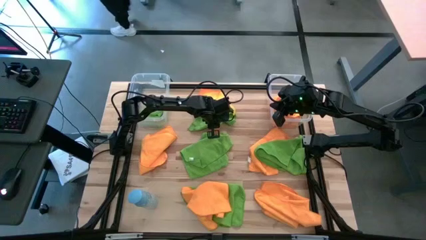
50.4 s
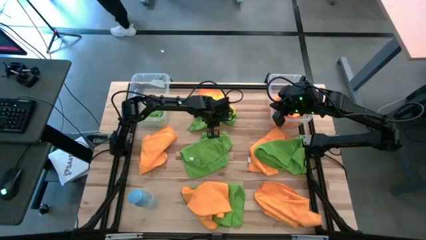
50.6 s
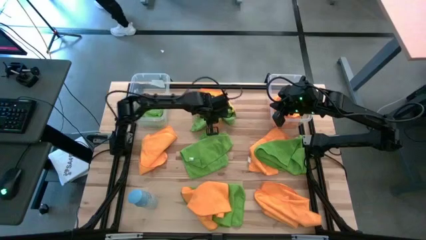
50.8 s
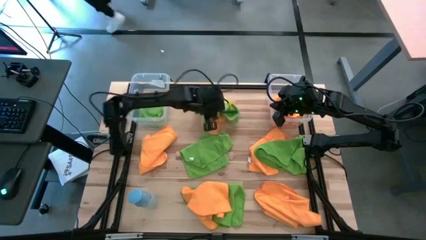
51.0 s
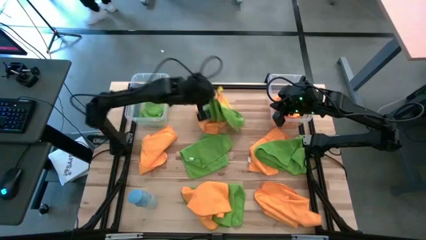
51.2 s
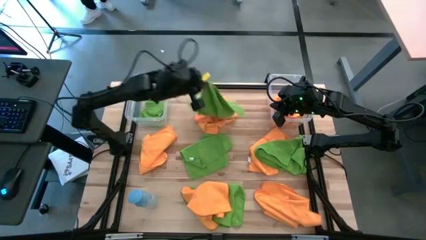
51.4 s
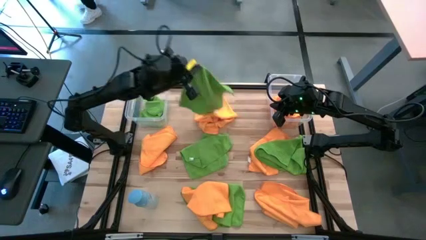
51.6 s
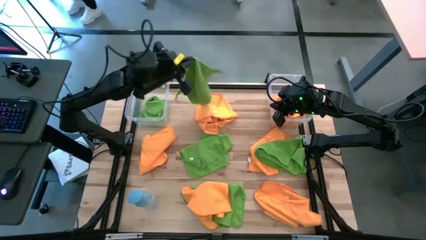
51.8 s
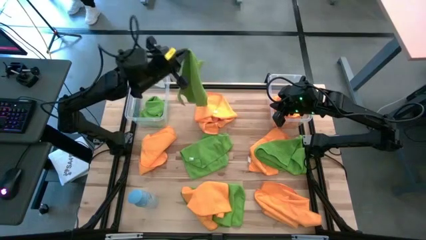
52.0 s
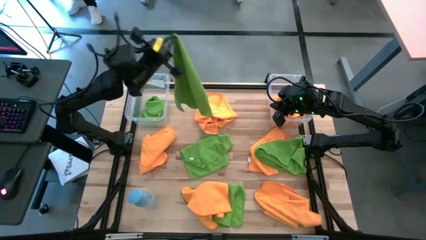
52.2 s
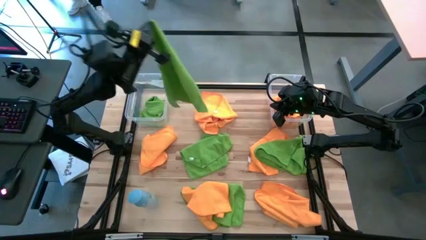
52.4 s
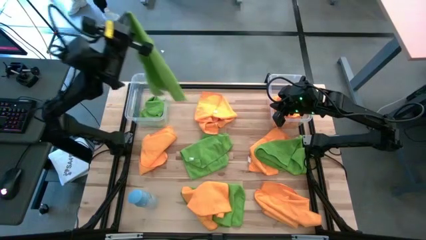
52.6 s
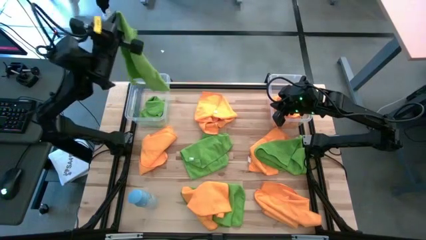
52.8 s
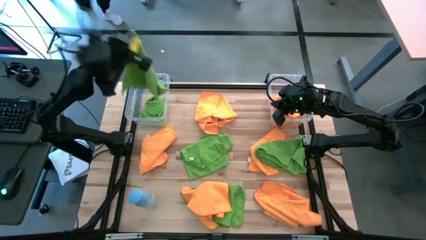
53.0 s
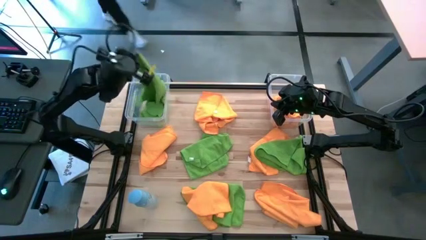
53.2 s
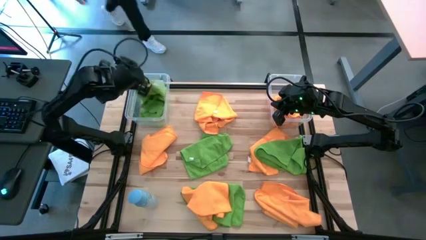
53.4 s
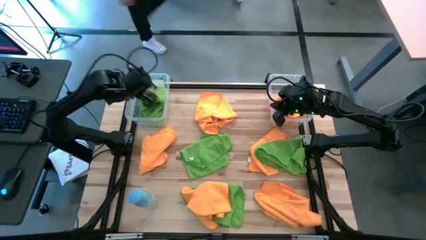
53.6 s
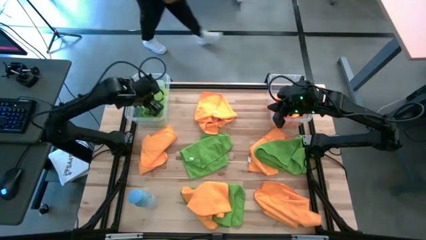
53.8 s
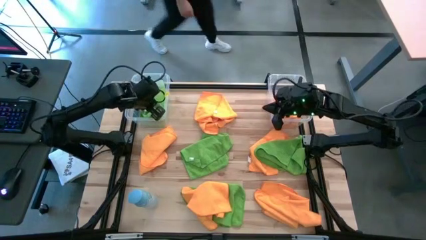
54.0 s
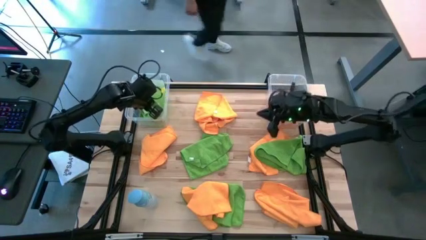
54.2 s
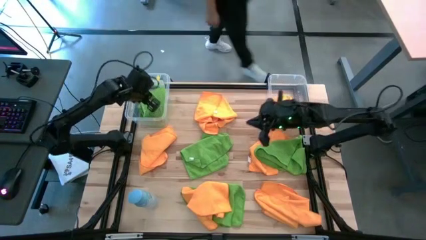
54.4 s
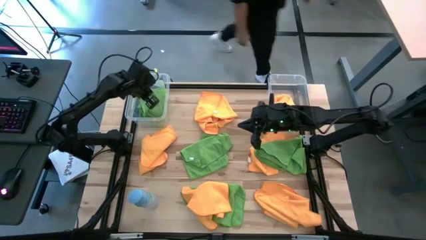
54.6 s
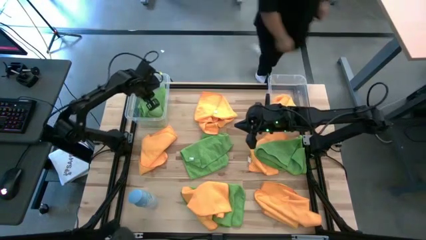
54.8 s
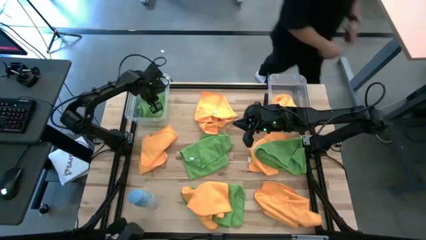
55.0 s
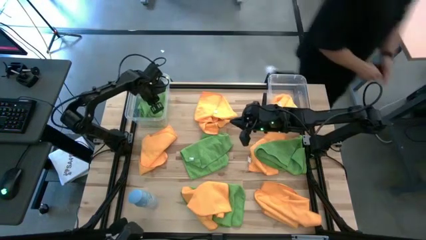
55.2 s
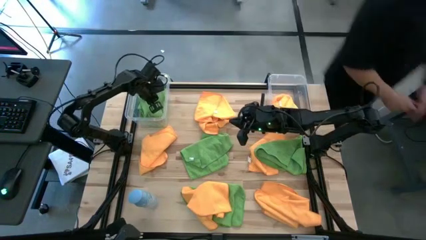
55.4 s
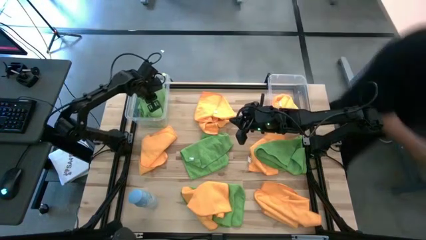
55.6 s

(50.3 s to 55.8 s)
Task: Sort microfiber towel by color & place in baskets
Put the green microfiber towel into the left transparent bin

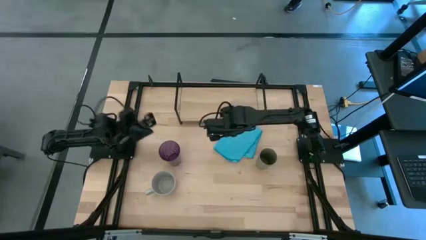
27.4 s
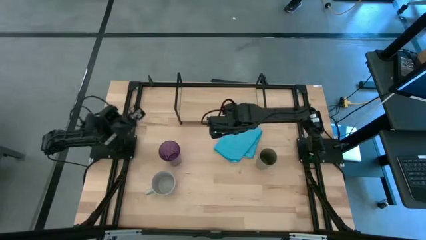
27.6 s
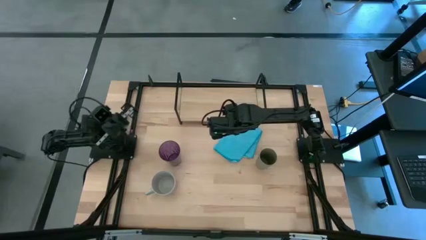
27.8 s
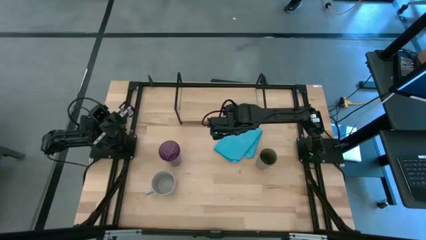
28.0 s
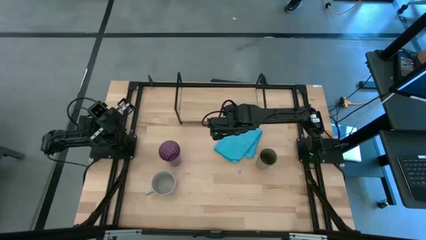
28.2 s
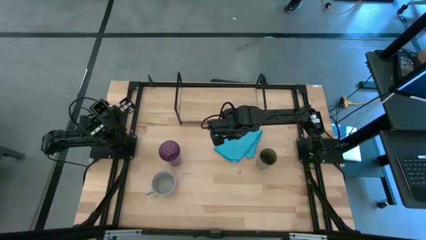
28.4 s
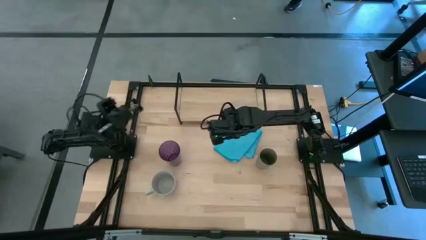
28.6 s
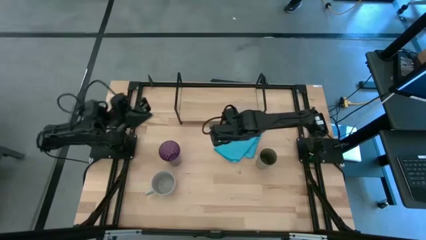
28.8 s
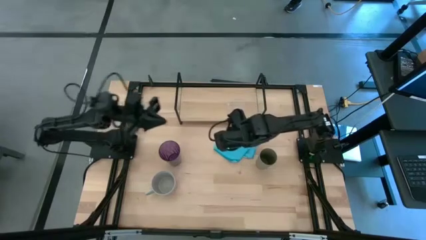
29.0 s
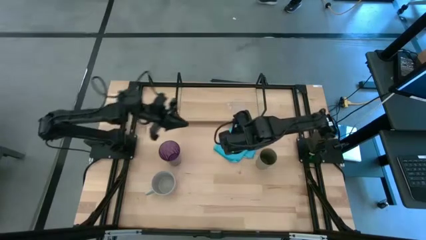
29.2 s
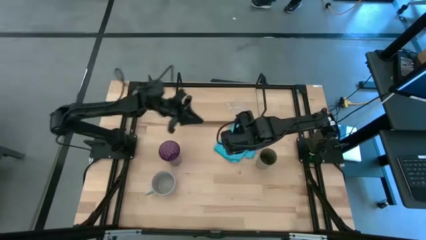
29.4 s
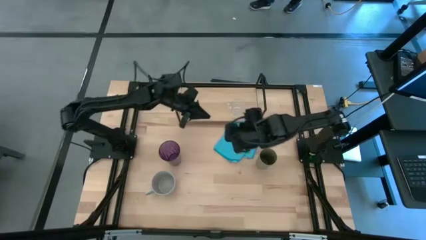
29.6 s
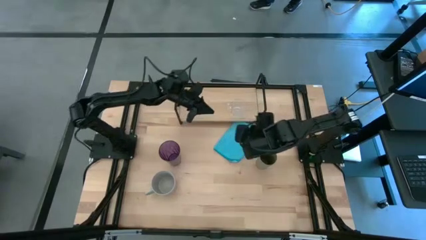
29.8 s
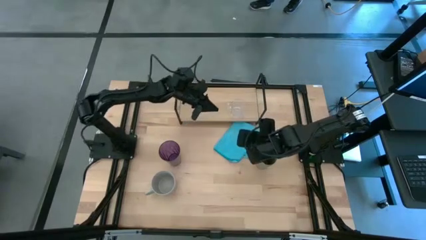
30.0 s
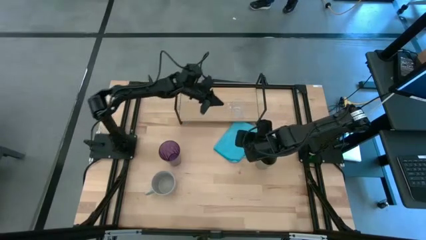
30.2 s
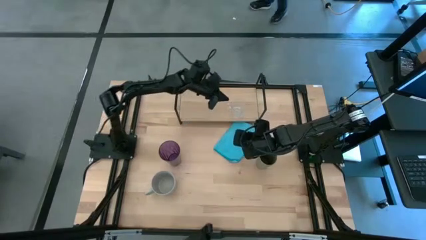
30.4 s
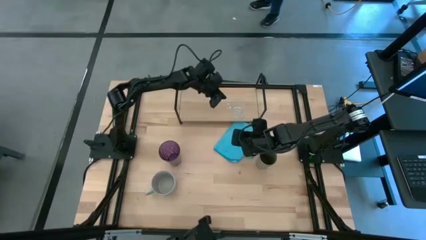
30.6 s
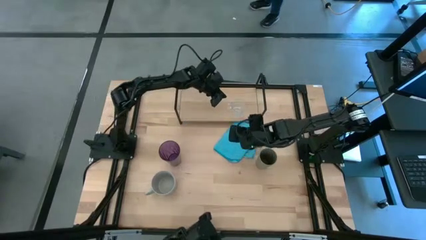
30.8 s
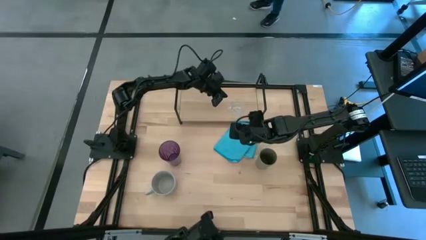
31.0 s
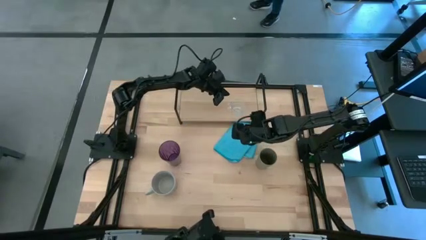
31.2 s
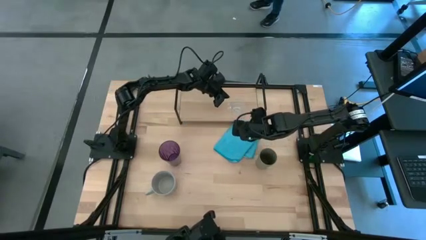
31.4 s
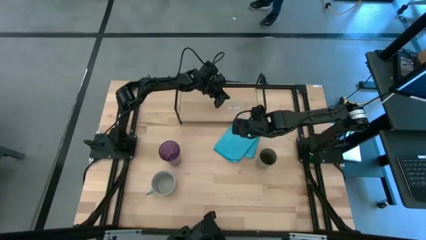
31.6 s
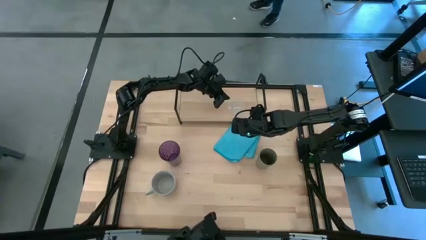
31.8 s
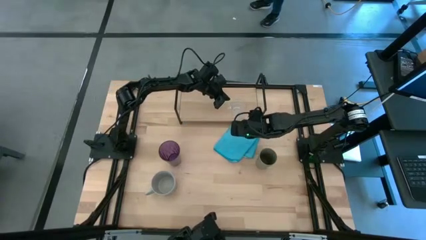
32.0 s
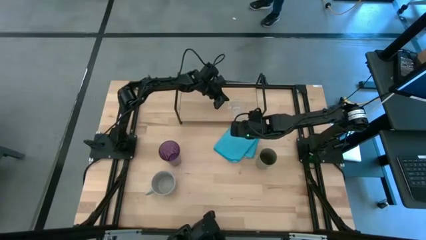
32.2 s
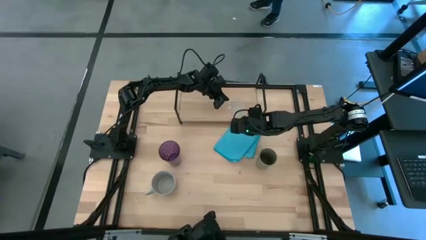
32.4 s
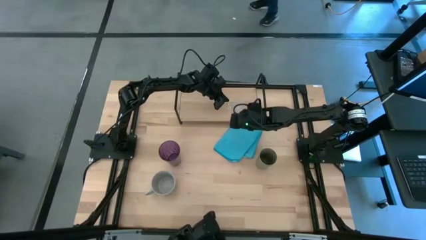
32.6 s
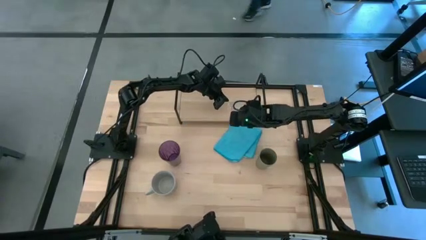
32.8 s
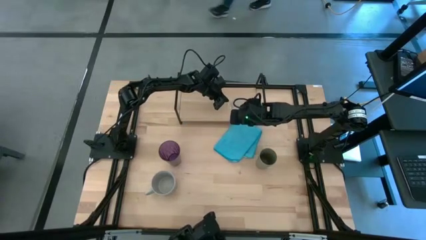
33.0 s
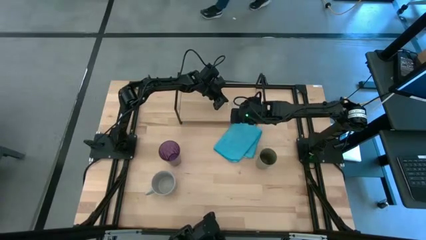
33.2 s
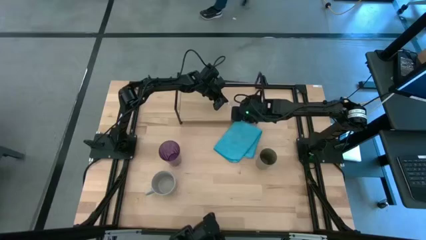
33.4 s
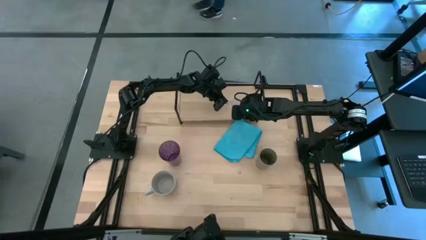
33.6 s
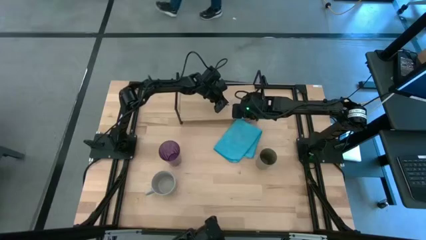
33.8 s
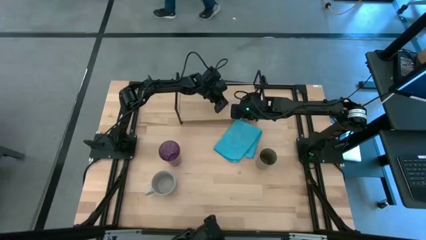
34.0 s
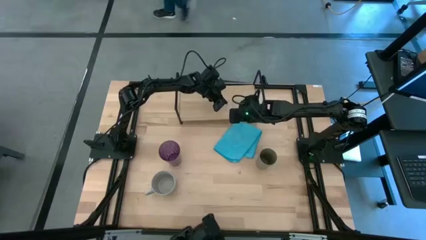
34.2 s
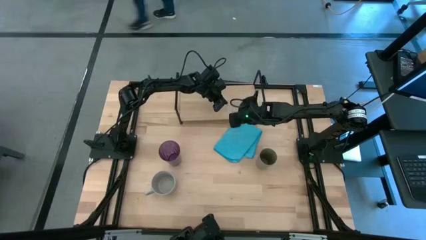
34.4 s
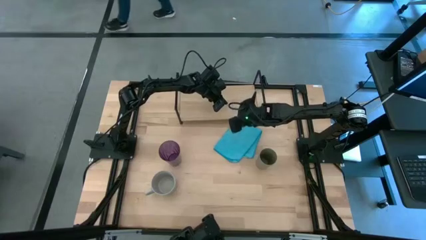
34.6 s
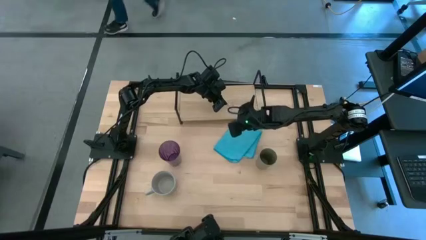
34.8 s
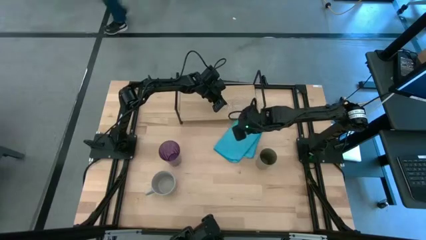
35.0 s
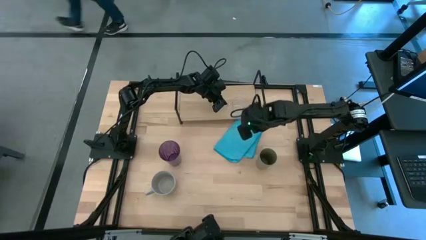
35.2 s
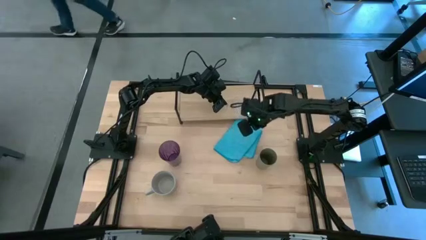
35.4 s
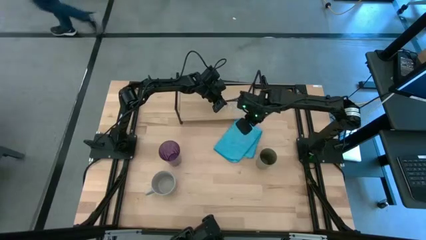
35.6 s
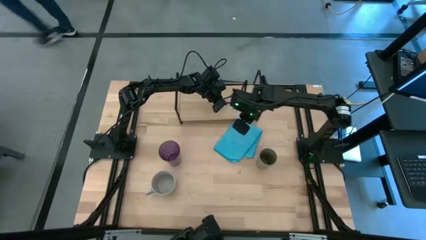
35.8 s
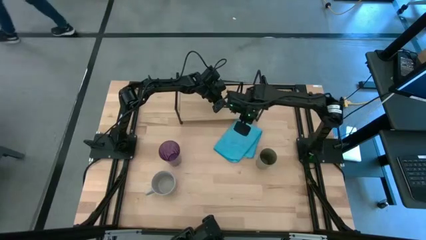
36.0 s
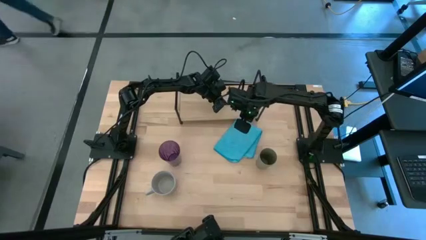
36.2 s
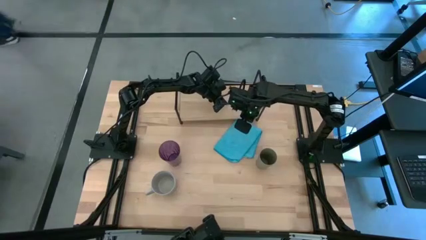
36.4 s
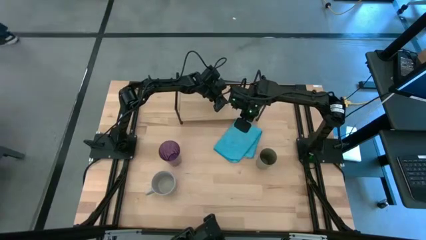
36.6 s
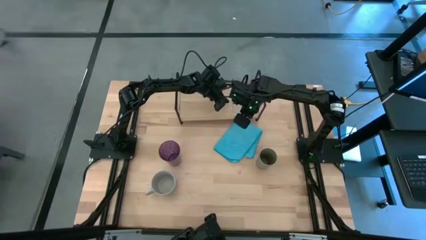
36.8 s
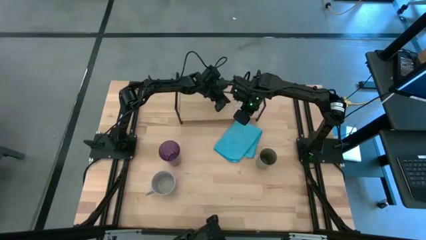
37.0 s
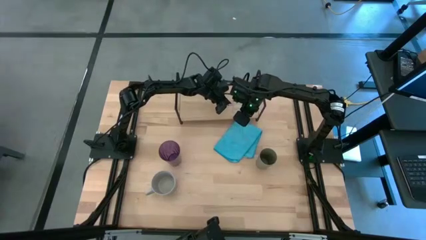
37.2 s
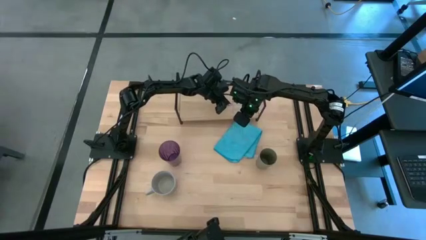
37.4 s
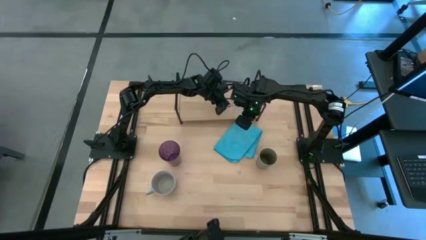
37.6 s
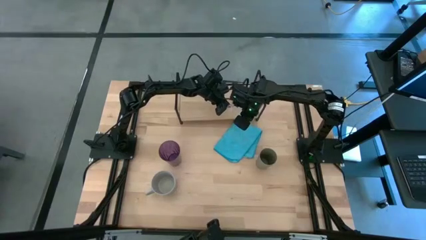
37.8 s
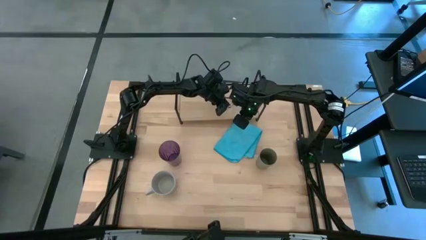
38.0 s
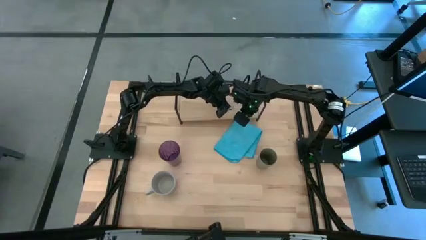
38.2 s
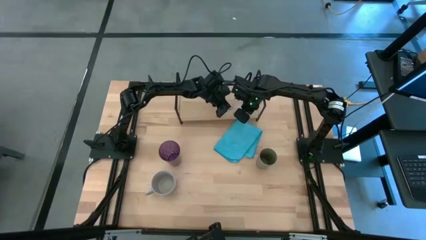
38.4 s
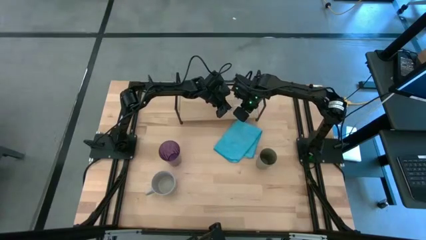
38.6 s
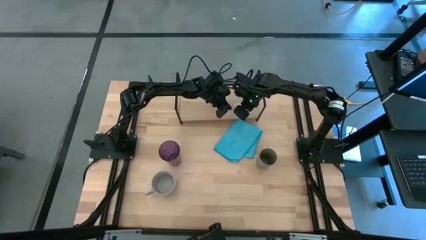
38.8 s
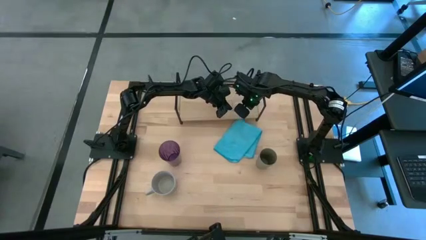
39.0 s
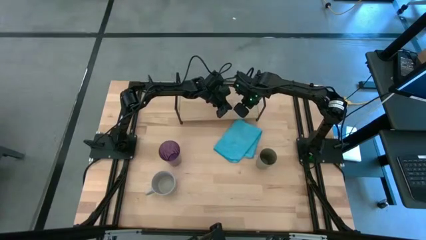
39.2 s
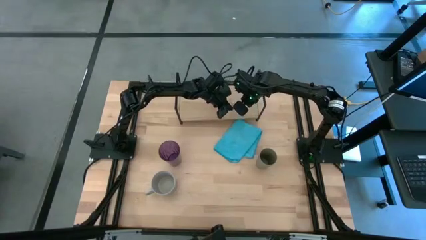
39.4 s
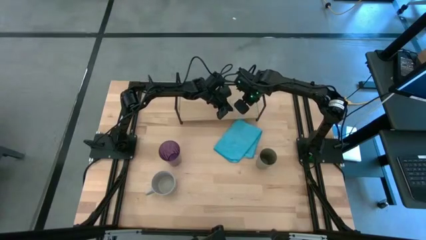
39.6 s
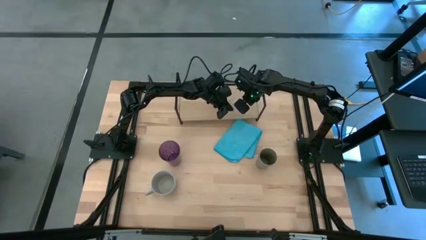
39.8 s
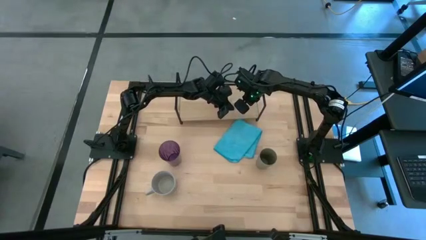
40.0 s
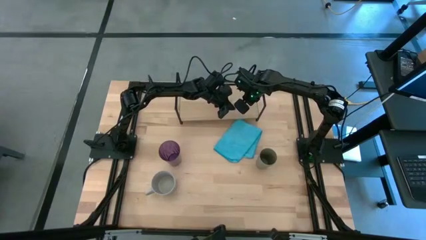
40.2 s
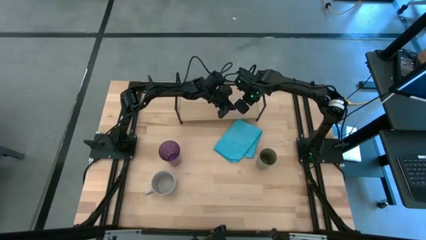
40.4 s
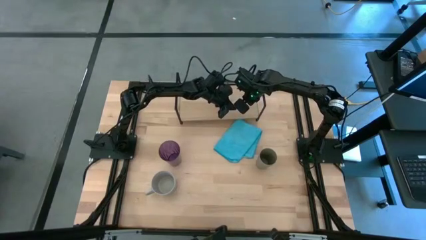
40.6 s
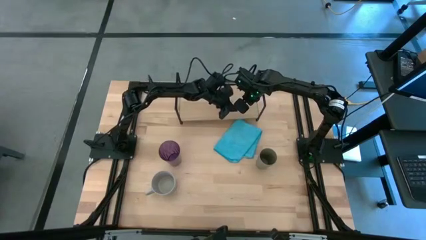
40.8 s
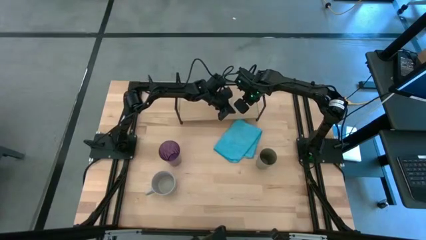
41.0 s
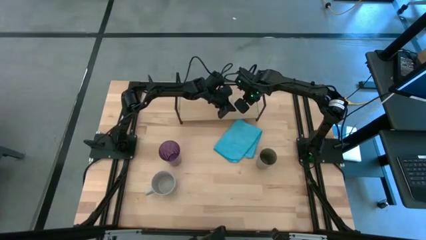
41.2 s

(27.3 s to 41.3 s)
Task: Stack small to large cups/mugs on shelf
Put the transparent mug on the shelf
